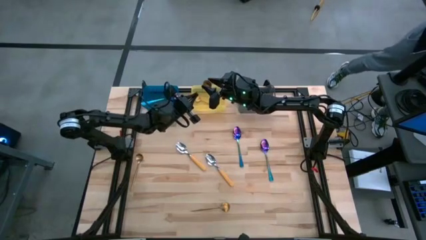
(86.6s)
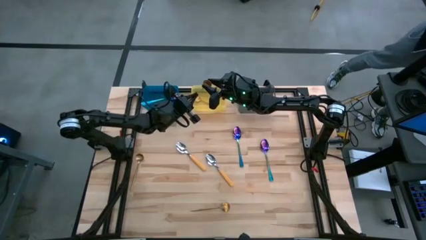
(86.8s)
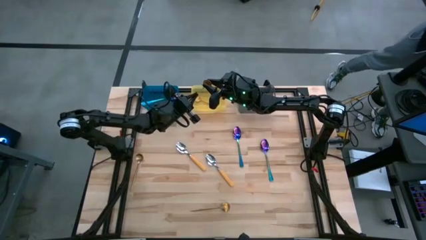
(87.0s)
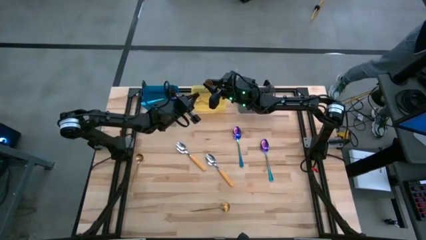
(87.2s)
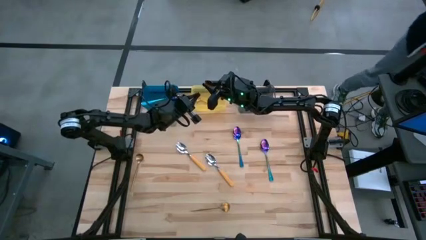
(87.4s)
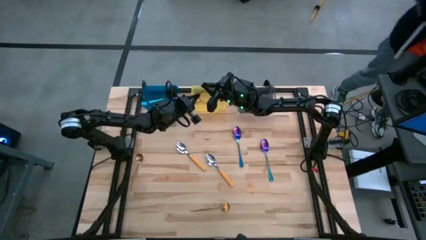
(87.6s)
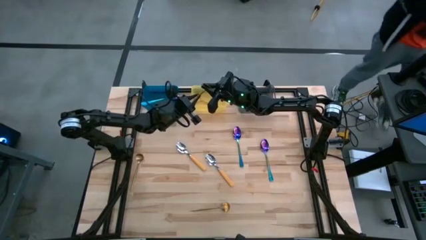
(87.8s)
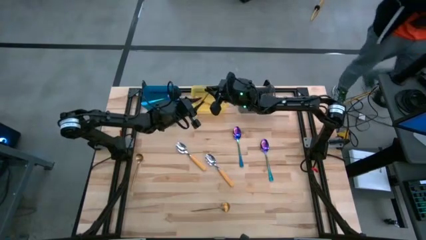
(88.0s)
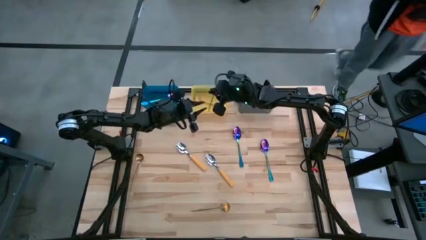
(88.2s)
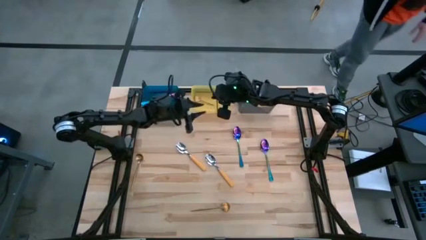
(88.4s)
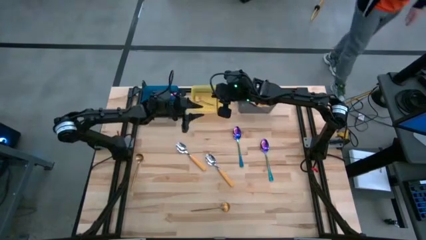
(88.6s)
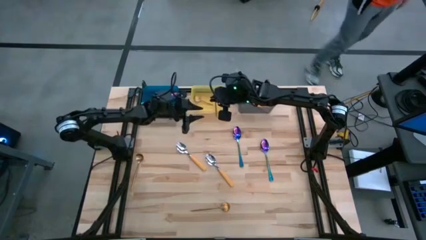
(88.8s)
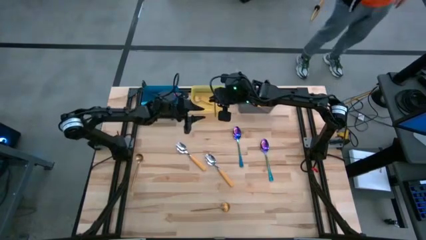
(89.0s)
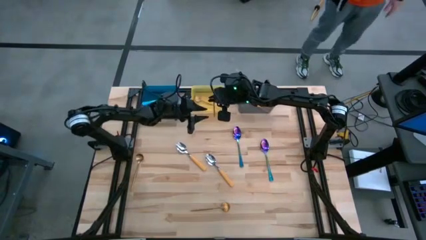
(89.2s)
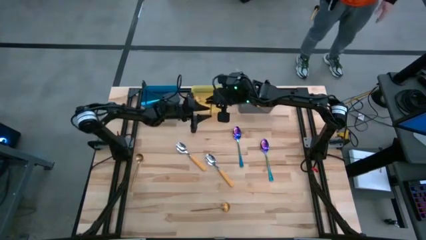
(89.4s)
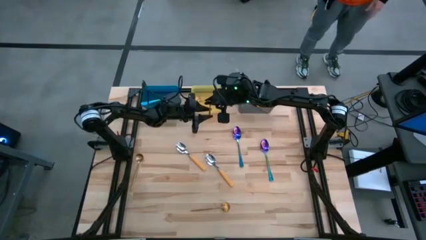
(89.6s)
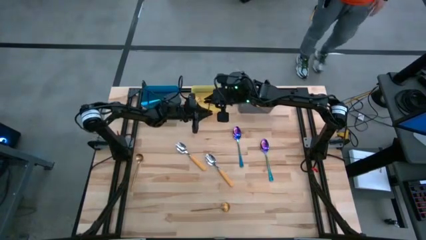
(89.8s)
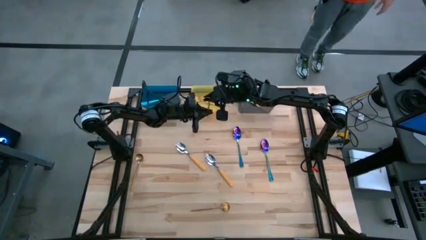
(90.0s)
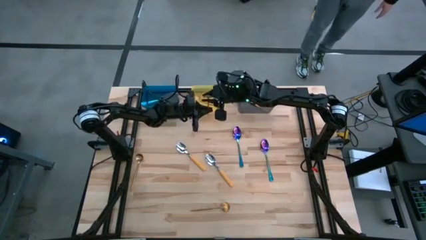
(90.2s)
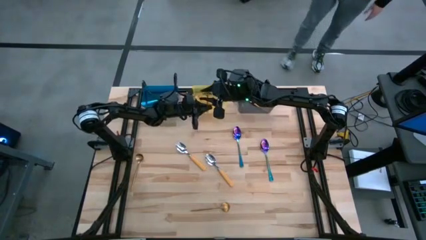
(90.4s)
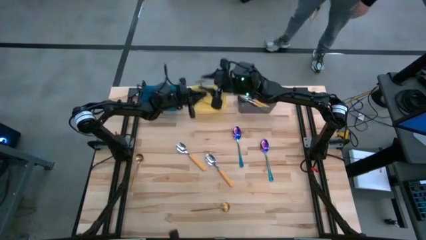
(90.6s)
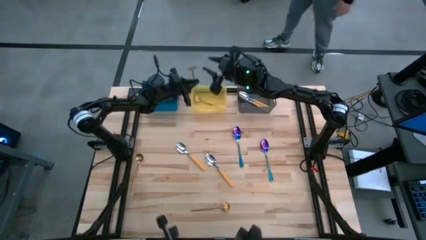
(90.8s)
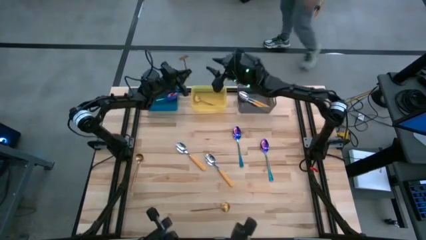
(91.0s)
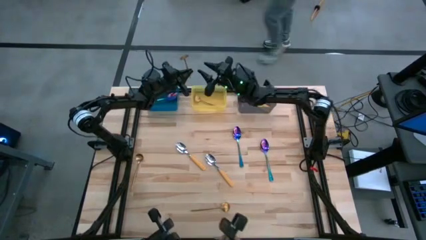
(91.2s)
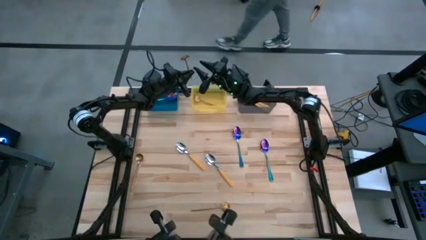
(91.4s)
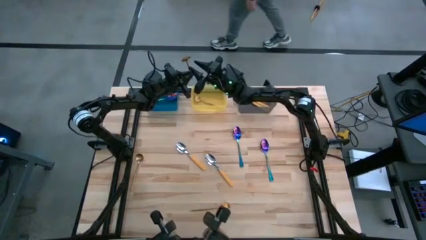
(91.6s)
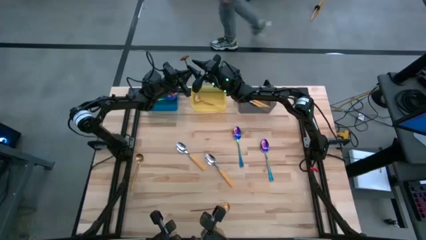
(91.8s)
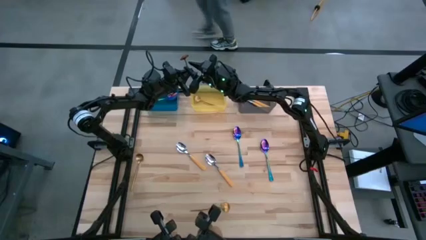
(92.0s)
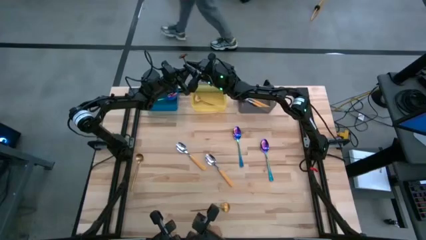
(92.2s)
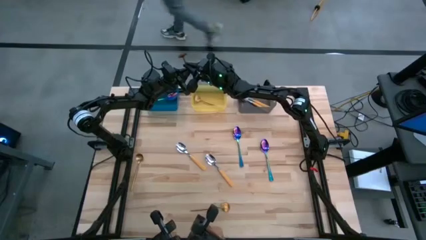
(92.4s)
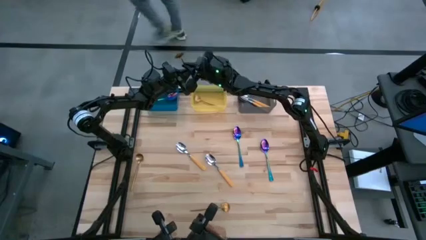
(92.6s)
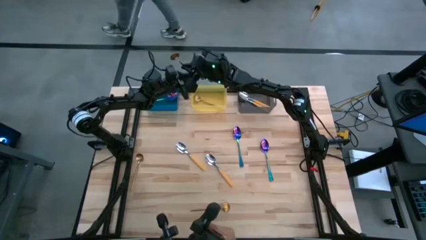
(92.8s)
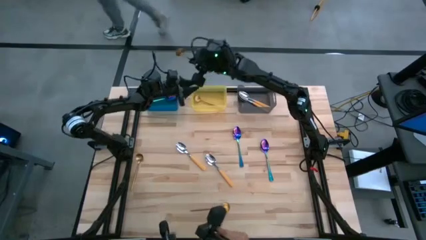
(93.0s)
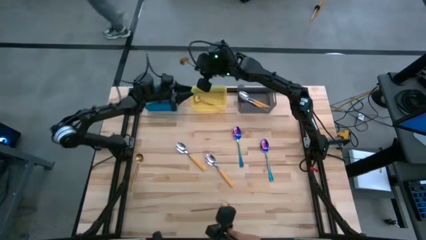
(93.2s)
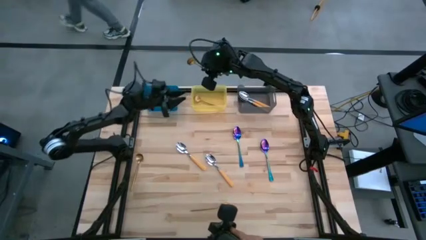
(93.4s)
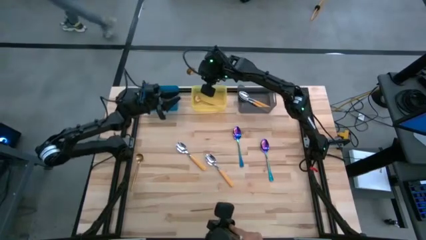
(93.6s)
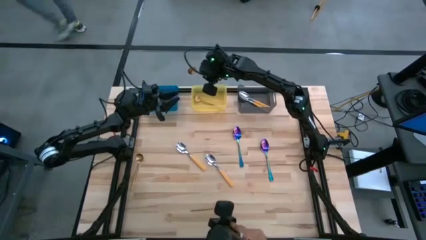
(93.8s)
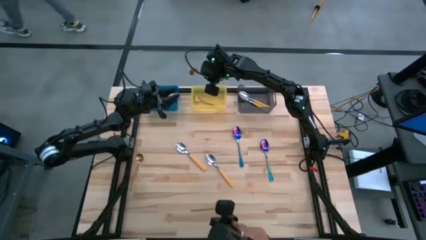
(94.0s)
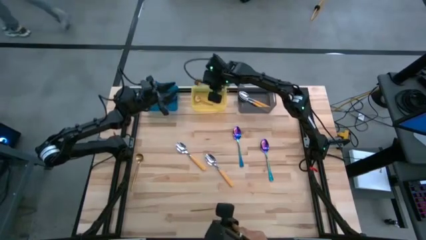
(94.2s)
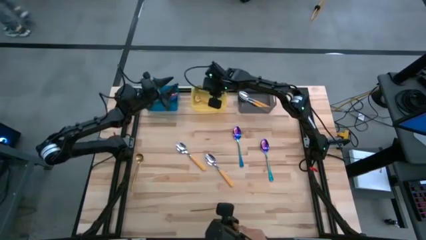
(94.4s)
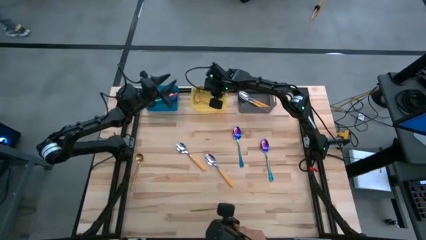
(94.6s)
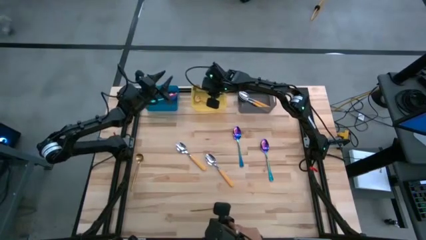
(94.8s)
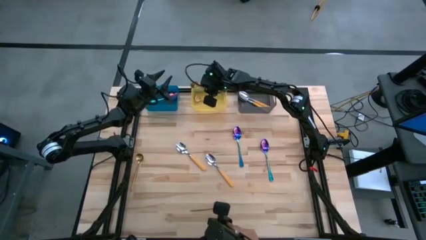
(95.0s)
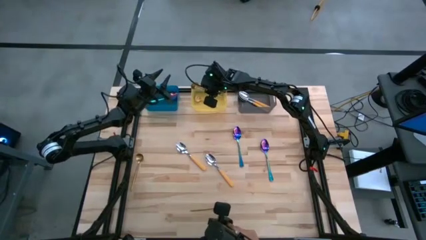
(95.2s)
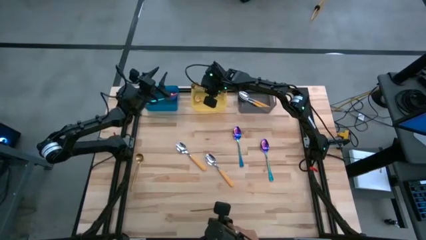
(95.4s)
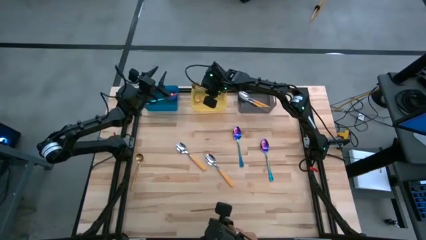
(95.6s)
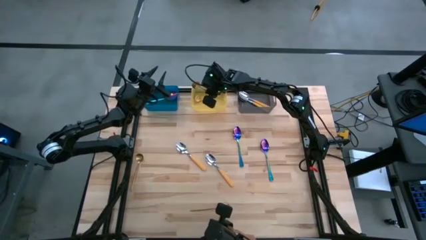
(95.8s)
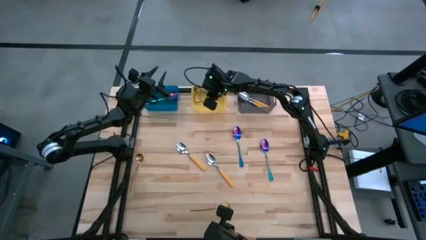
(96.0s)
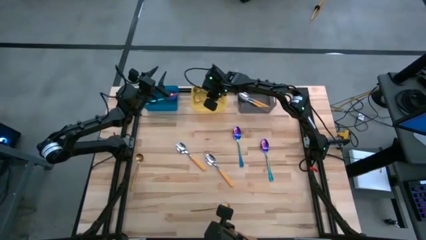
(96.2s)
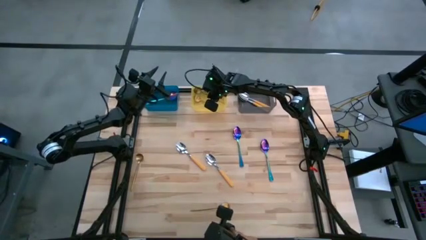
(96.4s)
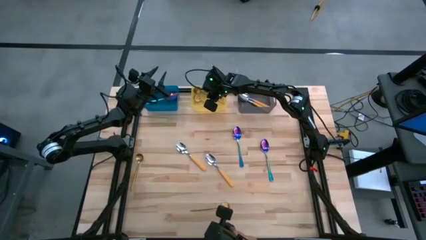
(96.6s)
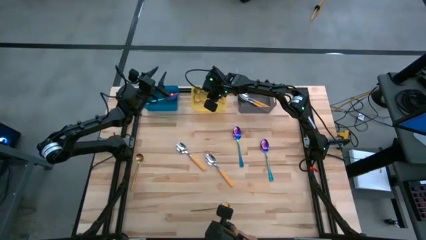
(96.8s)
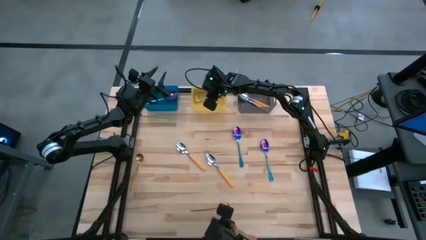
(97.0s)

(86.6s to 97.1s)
Task: Sort silverware by color (type)
Put the gold spoon into the yellow bin

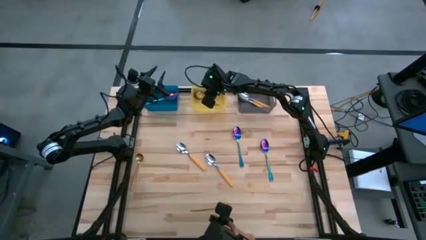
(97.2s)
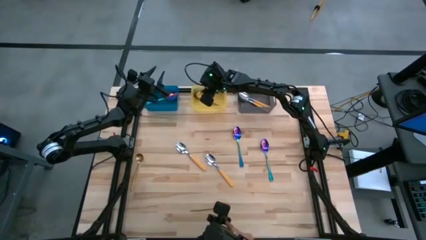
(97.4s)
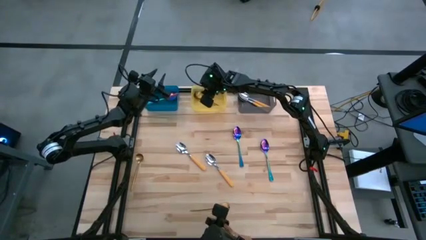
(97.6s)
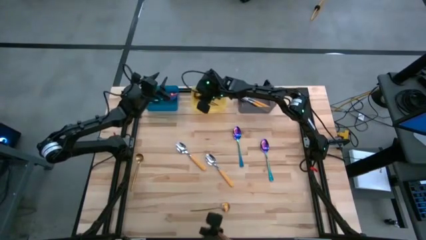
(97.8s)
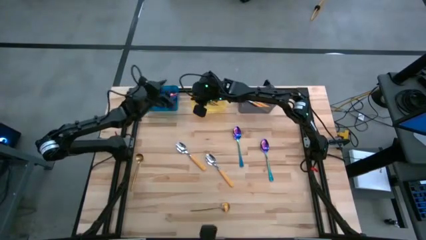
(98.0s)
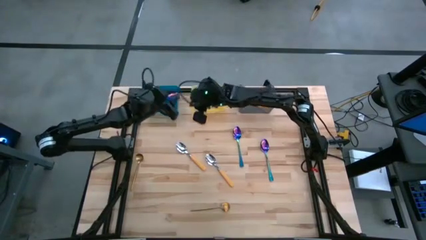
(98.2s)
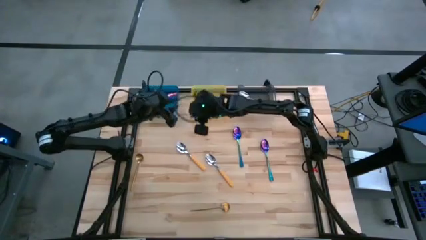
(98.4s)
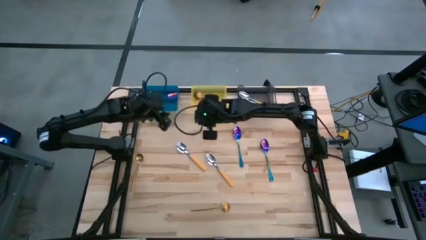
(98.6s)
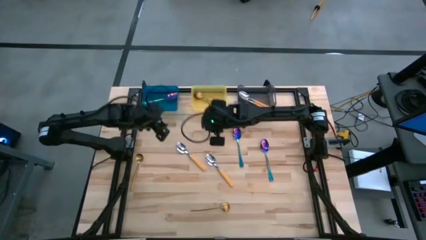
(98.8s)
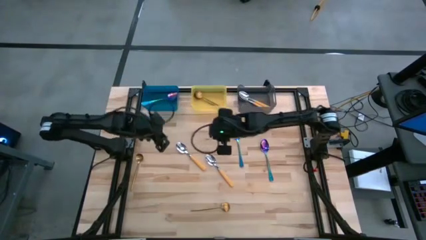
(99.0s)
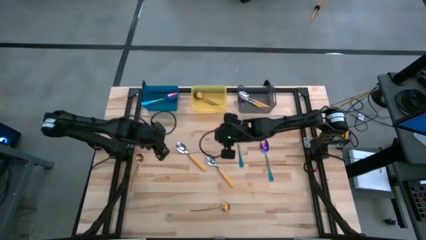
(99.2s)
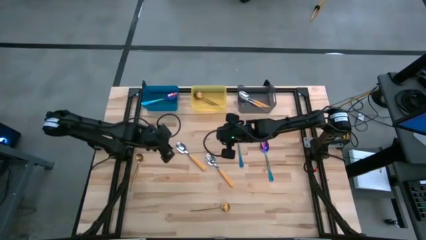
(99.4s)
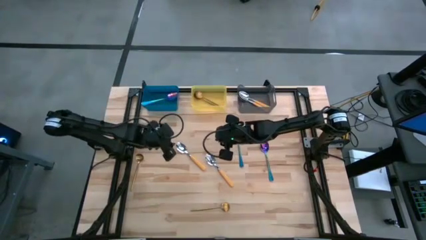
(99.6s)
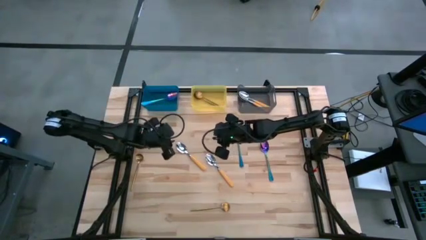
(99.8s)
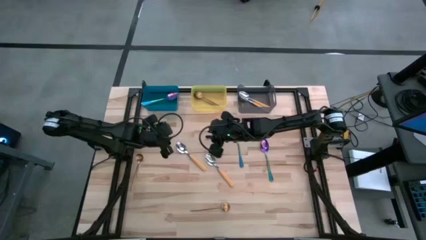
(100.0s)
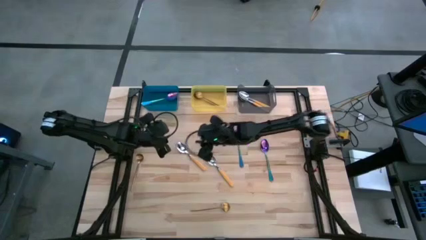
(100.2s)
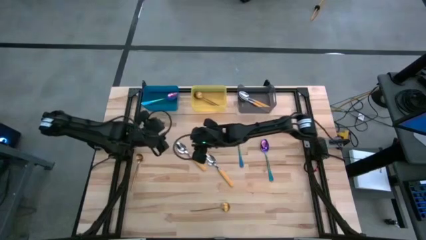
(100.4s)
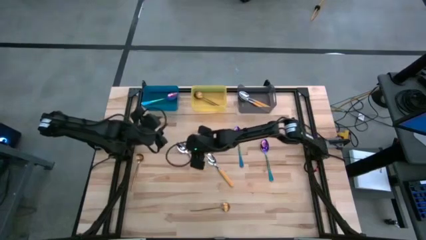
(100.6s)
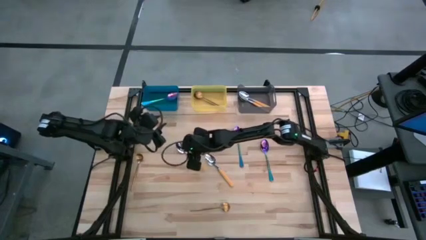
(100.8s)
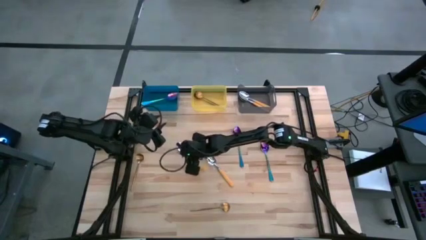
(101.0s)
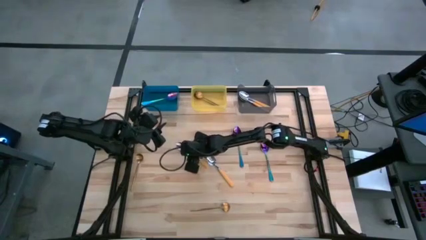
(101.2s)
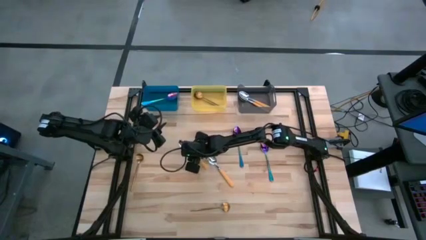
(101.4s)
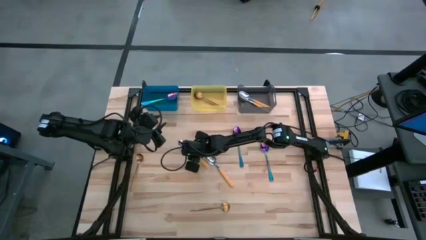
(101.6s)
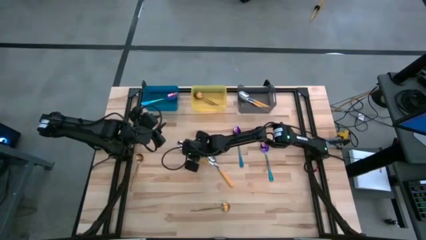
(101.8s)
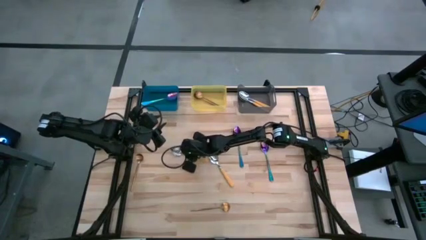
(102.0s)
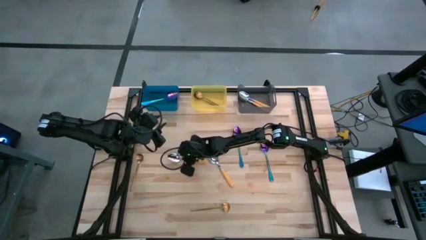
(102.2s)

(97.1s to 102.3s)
Put the yellow spoon into the black bin
